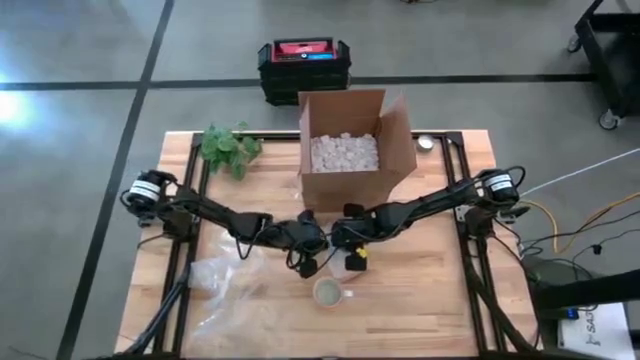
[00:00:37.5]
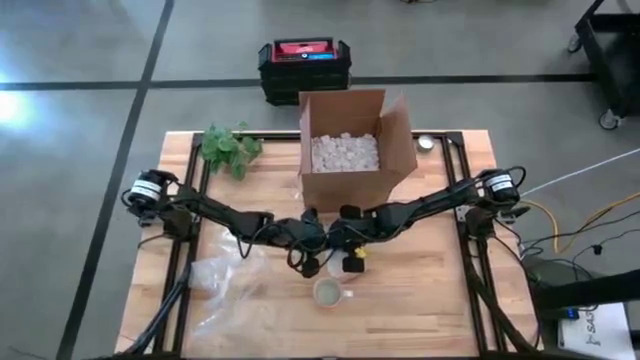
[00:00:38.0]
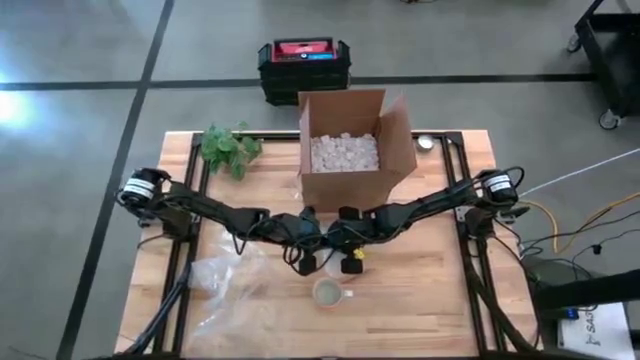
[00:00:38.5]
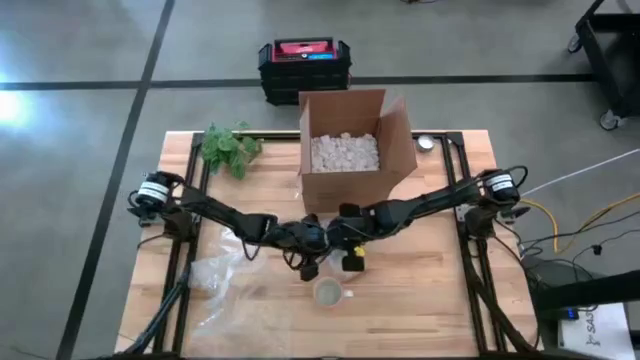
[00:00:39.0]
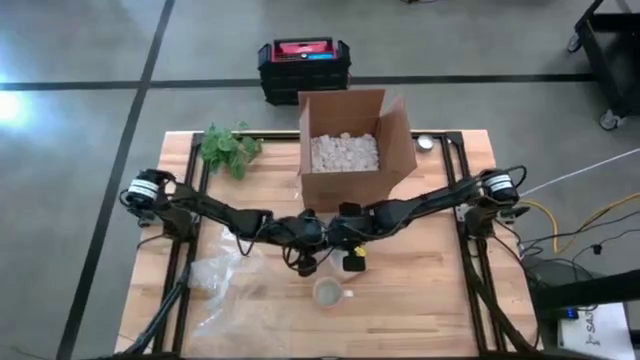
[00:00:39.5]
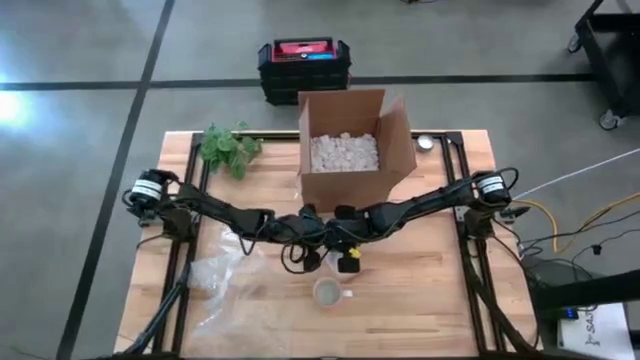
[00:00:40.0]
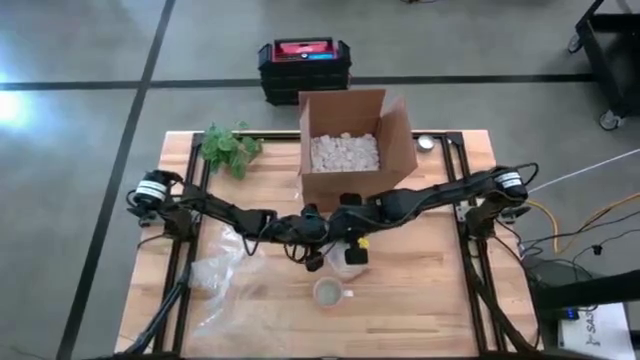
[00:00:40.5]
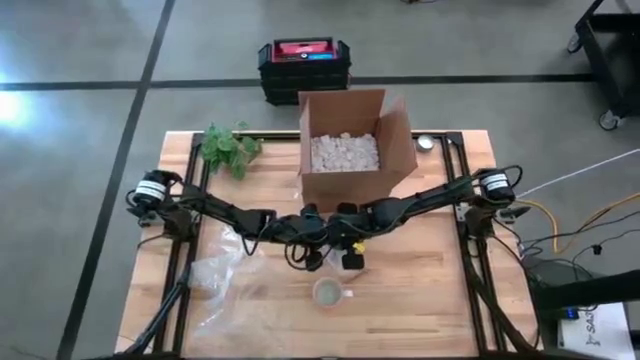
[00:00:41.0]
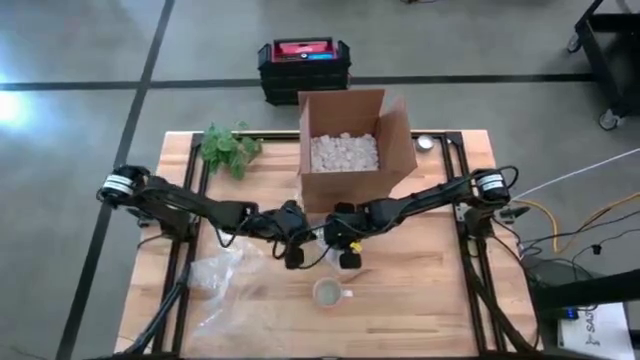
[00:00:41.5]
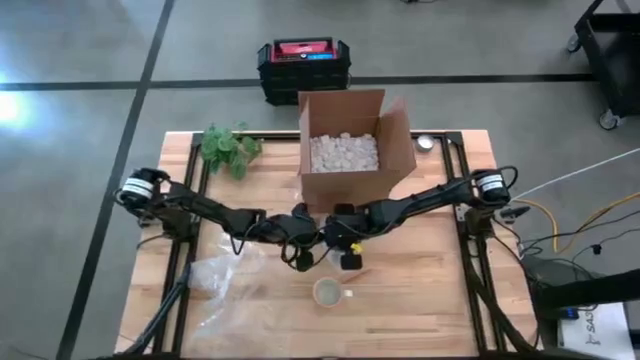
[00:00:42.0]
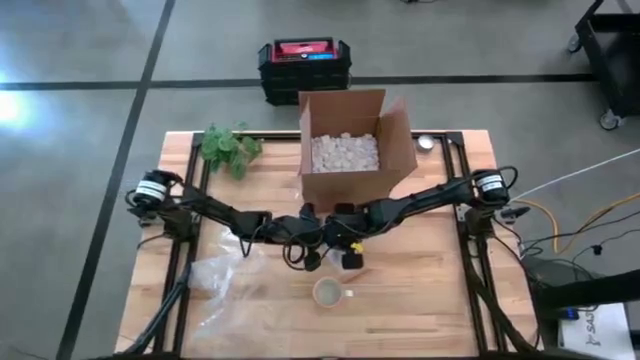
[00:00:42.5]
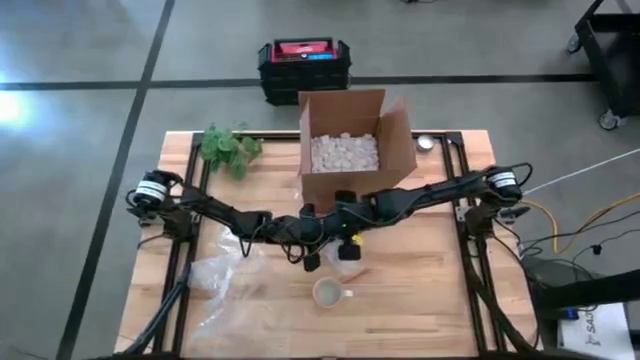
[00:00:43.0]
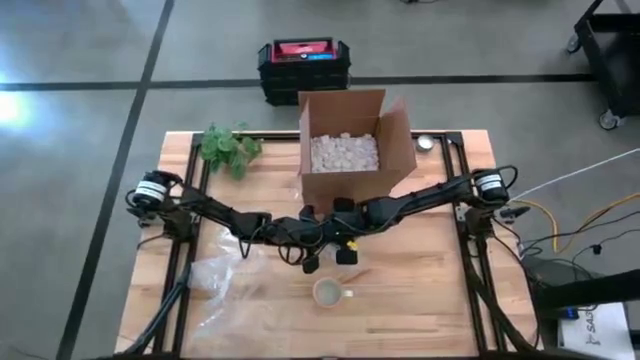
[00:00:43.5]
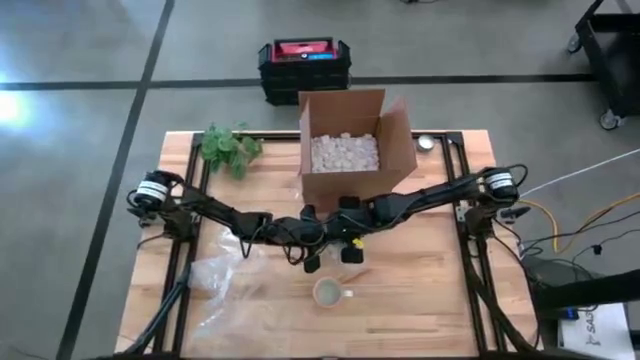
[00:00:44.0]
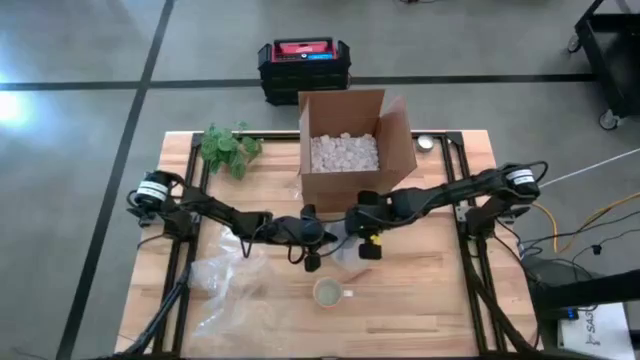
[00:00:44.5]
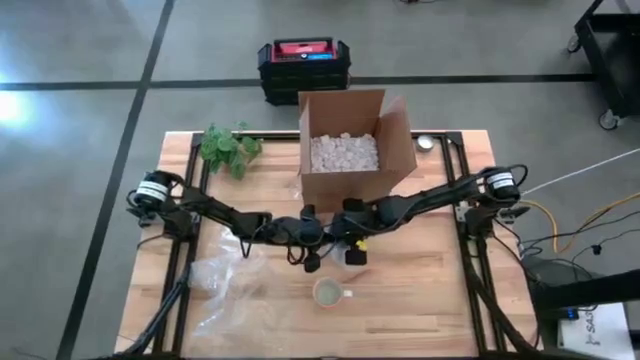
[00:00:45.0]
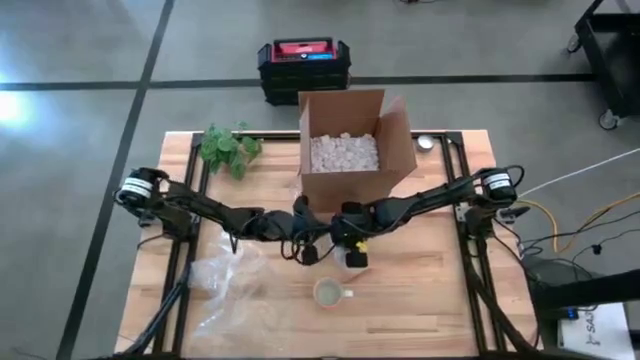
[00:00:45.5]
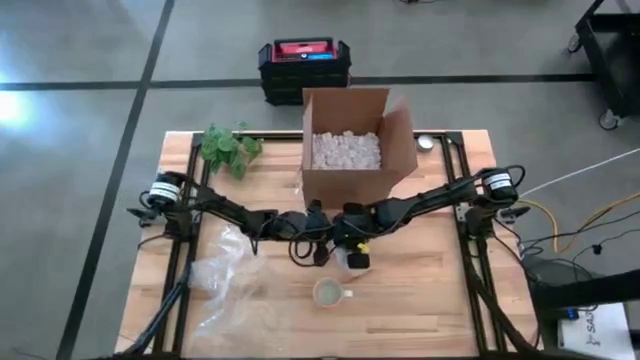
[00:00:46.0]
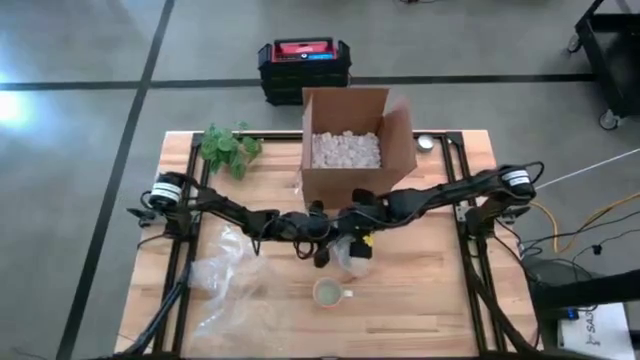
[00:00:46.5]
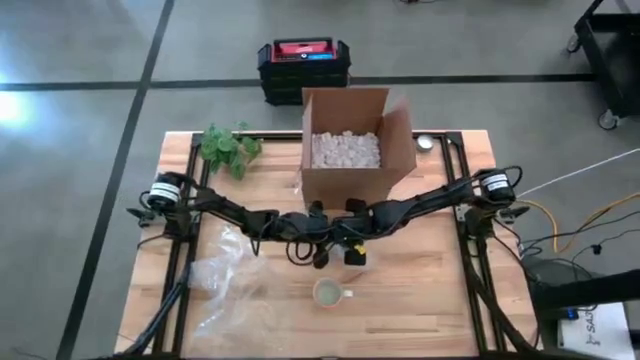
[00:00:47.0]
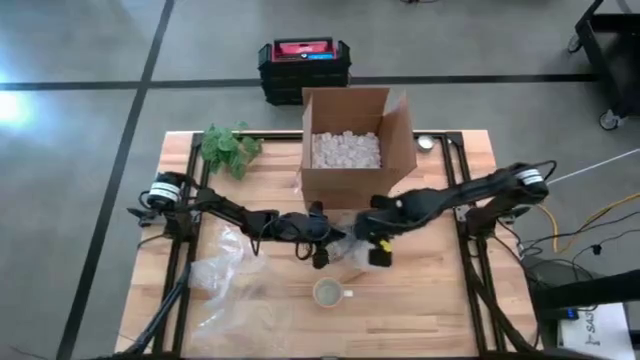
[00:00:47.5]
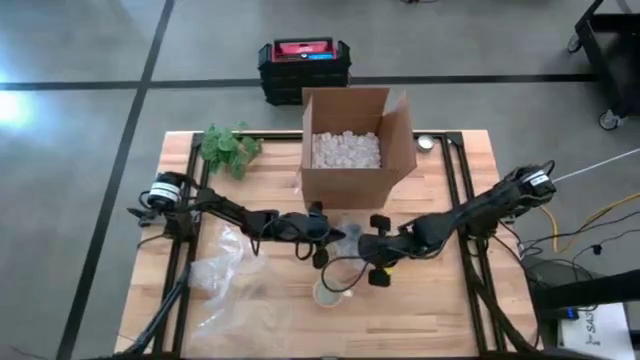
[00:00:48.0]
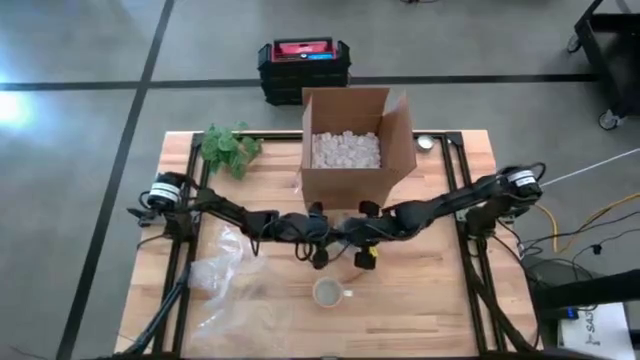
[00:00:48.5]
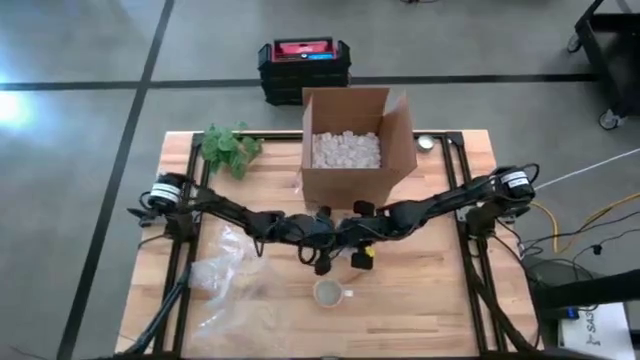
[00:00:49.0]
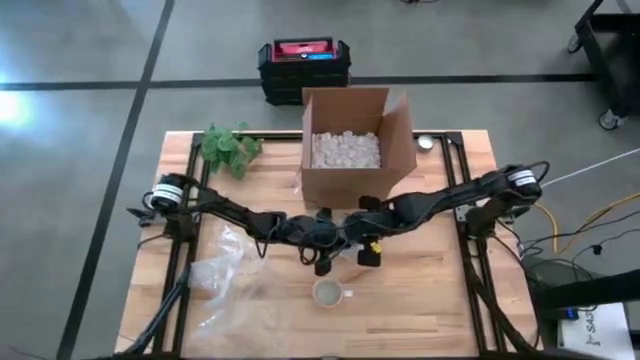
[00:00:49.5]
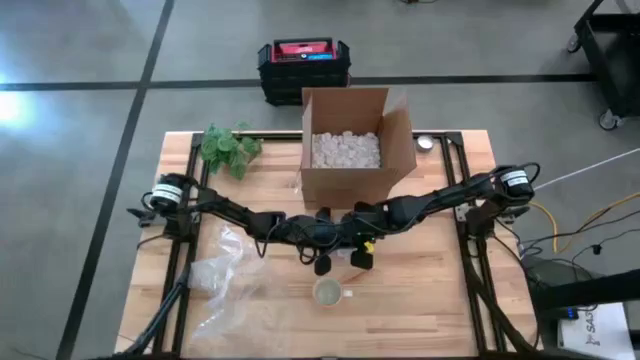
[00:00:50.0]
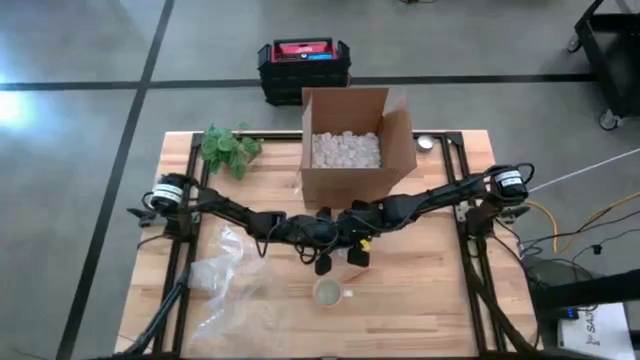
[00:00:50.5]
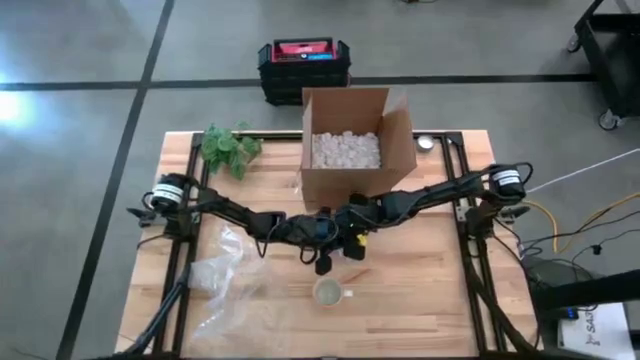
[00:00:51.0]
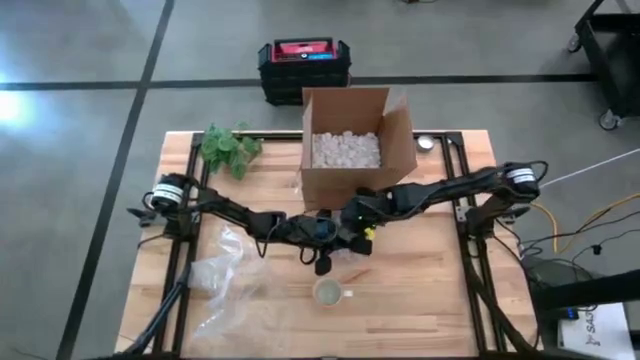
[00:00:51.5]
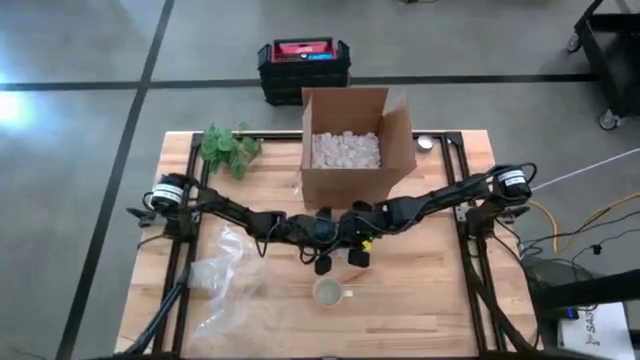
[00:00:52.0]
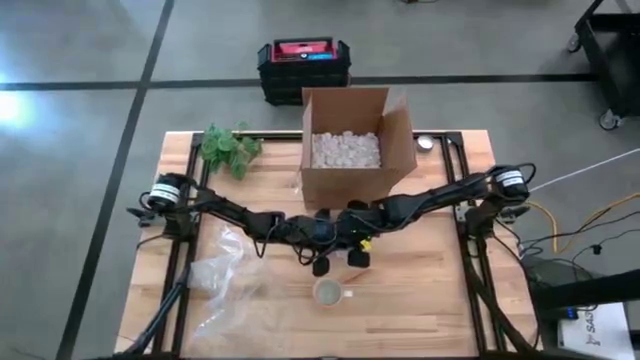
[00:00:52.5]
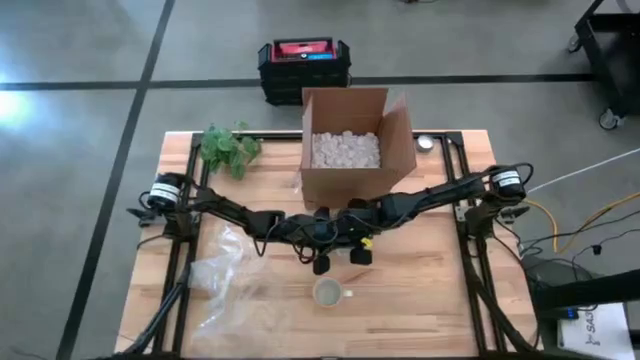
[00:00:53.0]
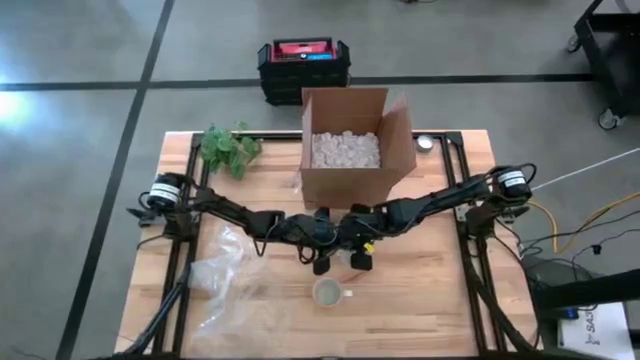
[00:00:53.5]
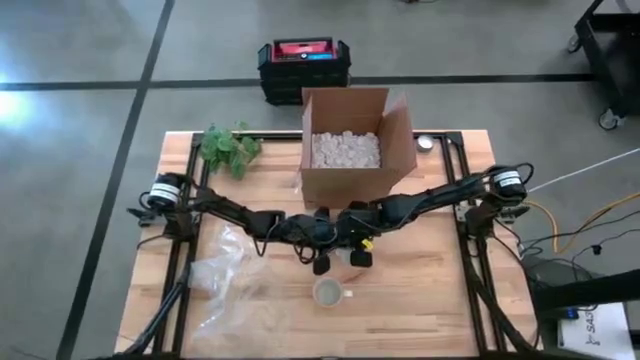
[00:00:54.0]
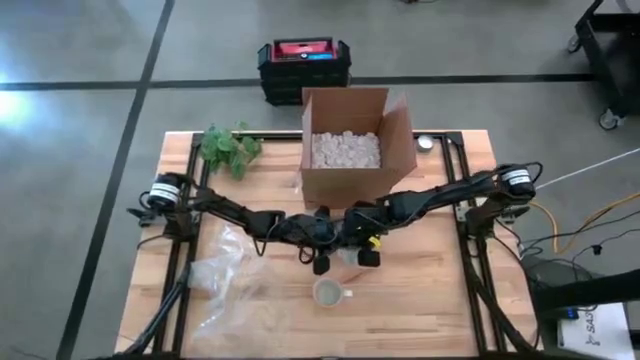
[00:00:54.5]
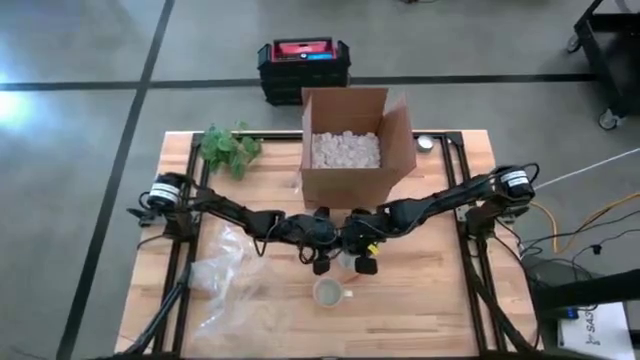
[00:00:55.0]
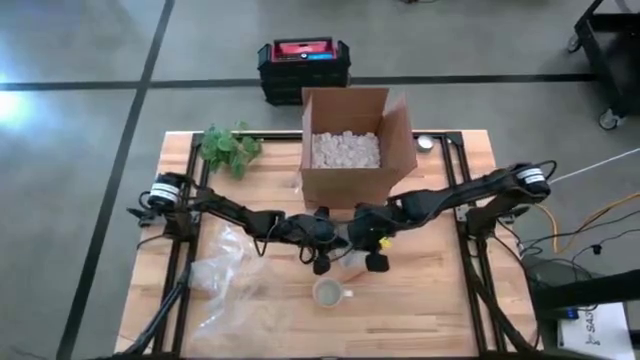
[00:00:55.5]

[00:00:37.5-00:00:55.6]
Task: wrap mug
Wrap the purple mug with bubble wrap

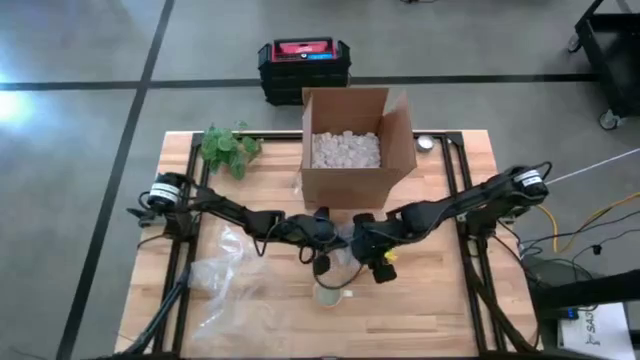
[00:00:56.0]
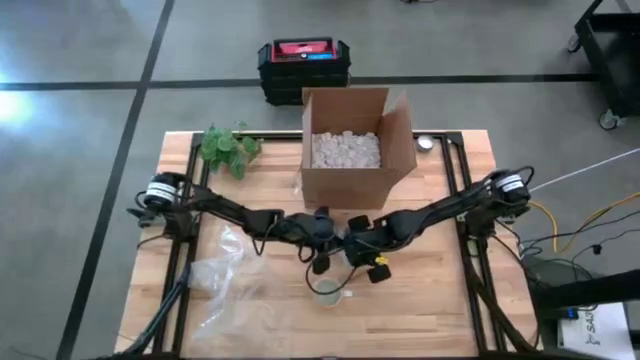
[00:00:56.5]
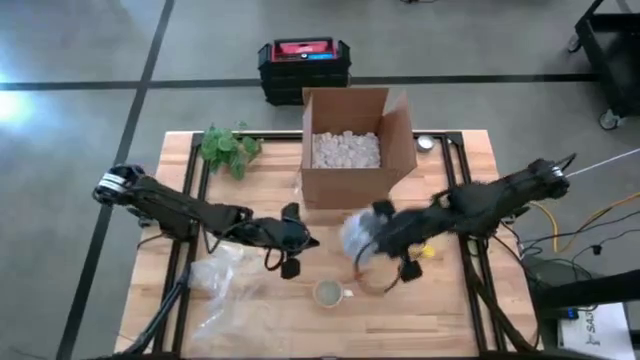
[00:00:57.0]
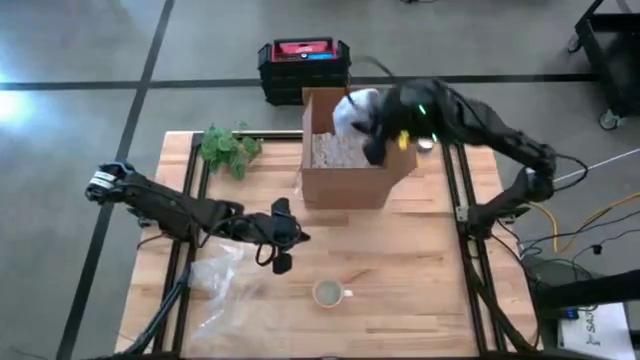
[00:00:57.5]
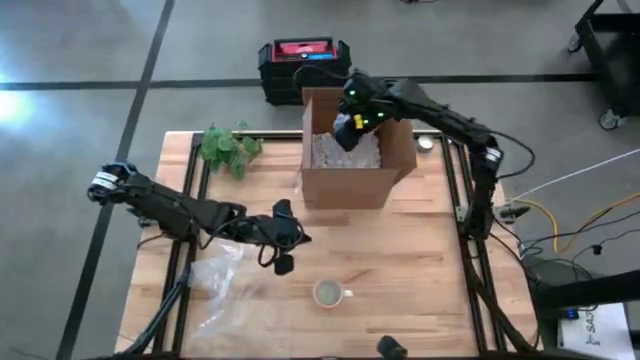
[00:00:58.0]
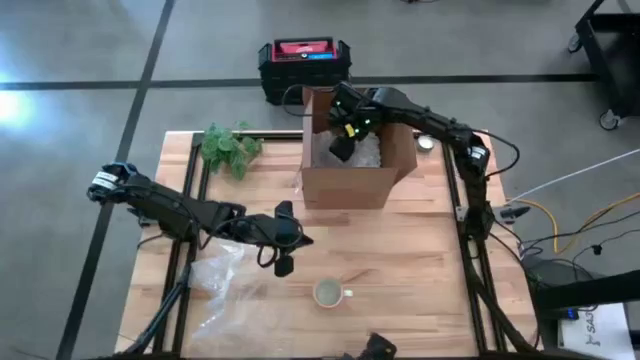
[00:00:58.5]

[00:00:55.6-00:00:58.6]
Put the wrapped purple mug into the box

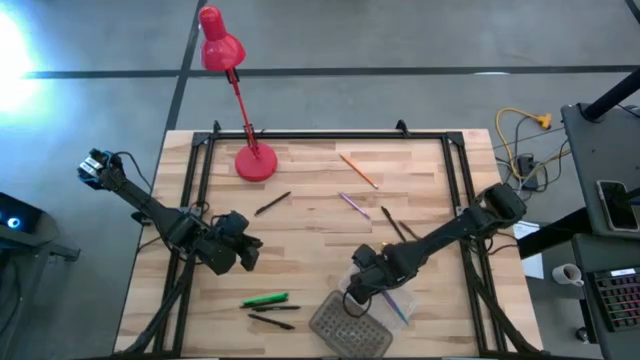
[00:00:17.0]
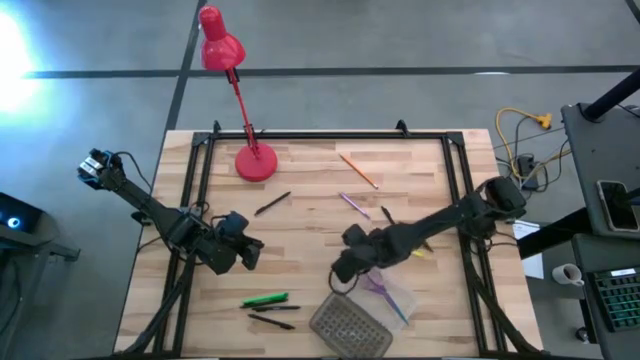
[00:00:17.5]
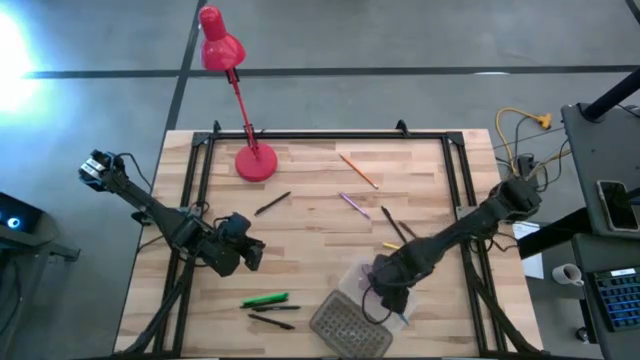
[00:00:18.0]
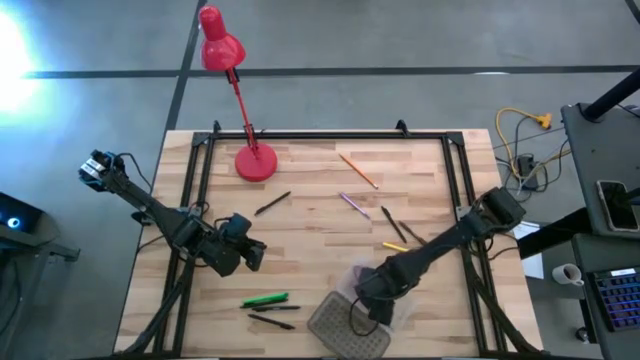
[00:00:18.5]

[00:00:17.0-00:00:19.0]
Task: Pick & place school supplies into a supply box
Adjust the purple scissors in the supply box
